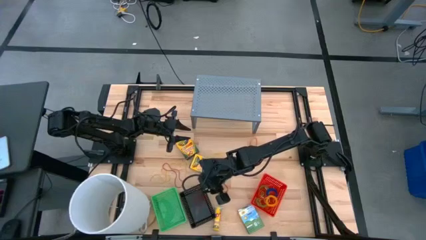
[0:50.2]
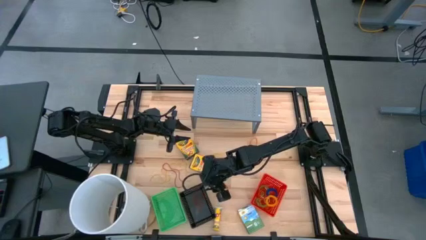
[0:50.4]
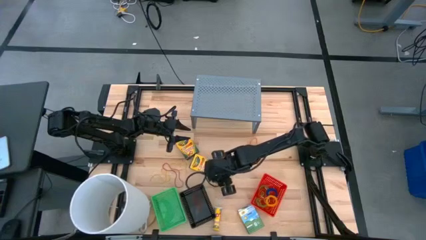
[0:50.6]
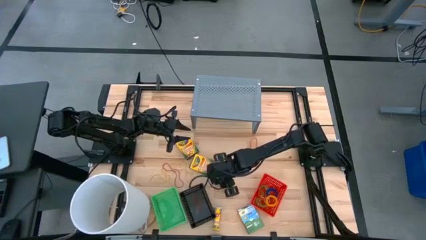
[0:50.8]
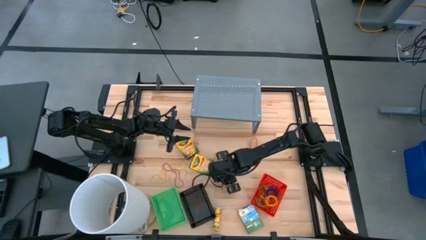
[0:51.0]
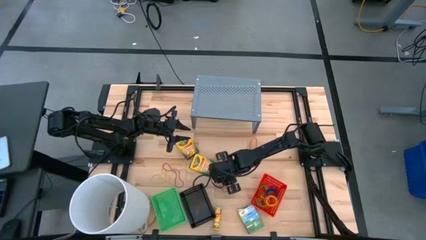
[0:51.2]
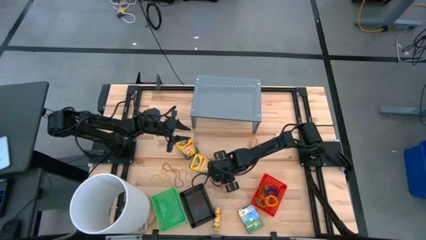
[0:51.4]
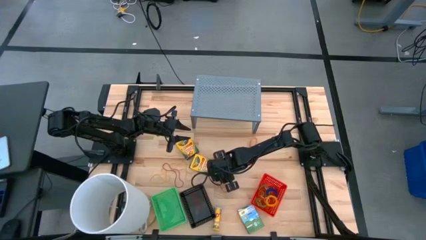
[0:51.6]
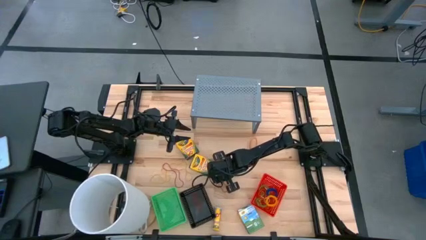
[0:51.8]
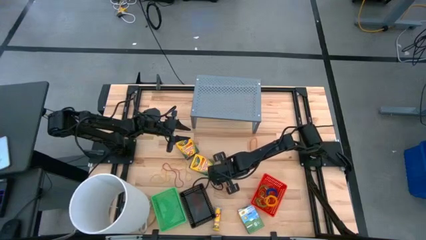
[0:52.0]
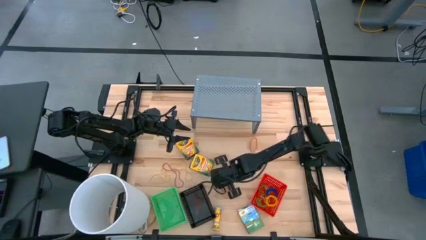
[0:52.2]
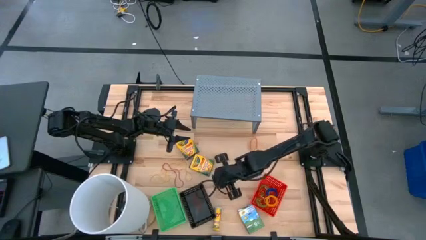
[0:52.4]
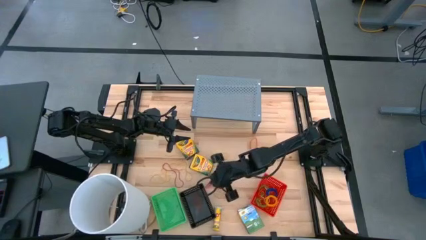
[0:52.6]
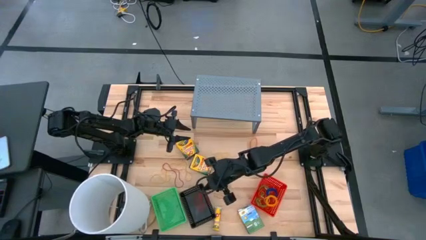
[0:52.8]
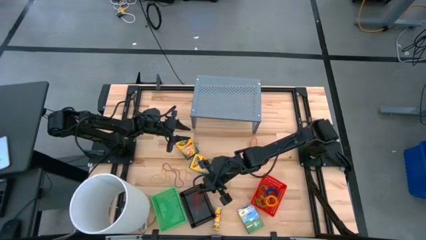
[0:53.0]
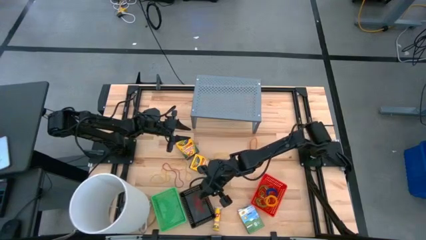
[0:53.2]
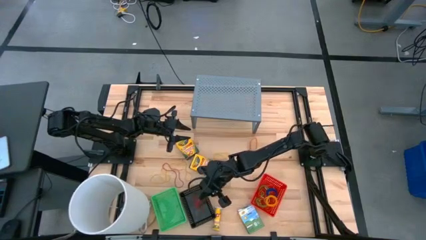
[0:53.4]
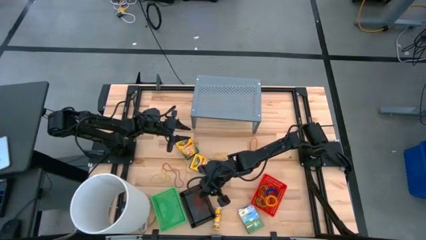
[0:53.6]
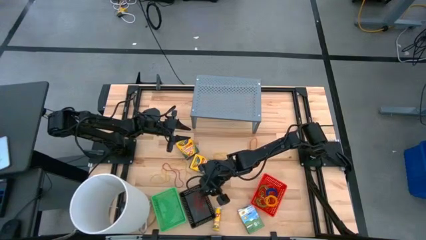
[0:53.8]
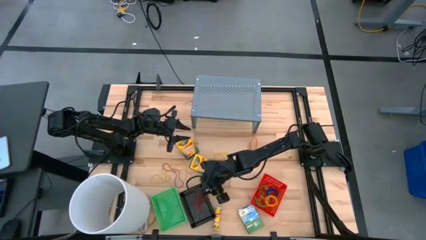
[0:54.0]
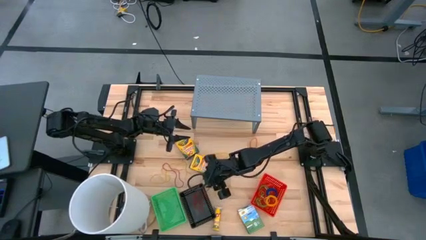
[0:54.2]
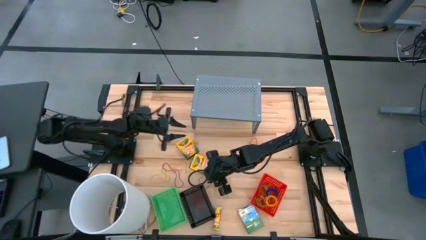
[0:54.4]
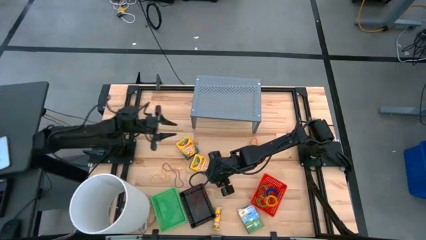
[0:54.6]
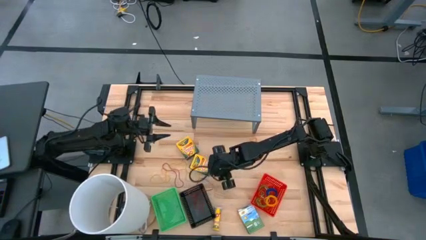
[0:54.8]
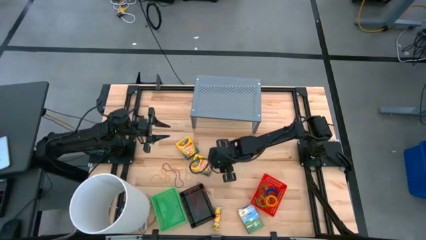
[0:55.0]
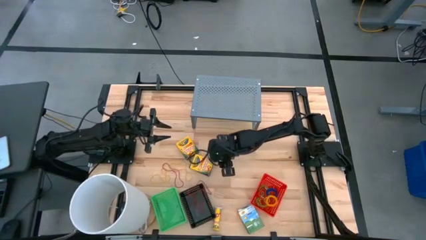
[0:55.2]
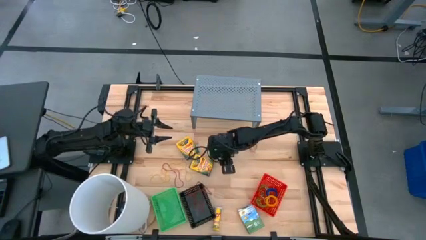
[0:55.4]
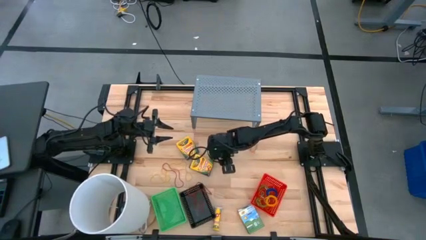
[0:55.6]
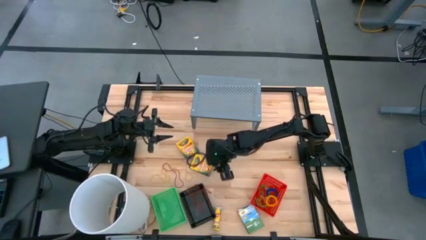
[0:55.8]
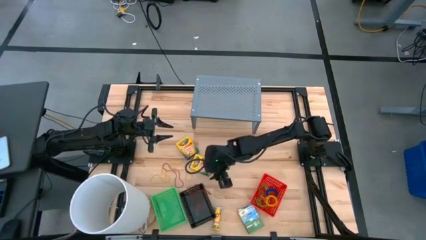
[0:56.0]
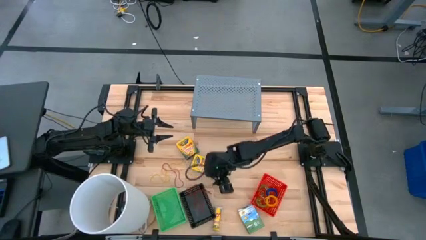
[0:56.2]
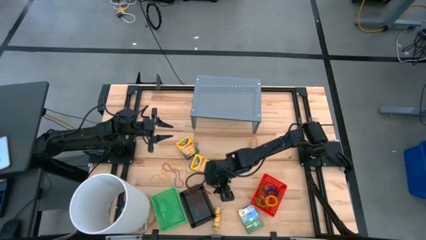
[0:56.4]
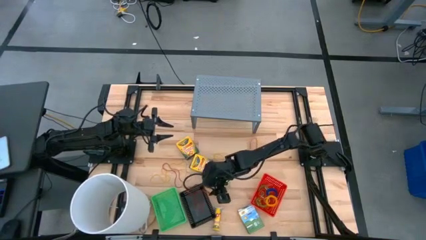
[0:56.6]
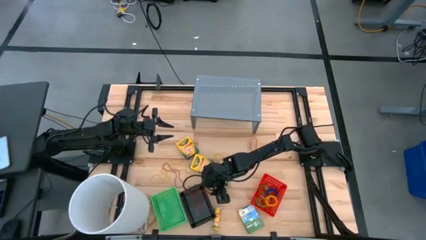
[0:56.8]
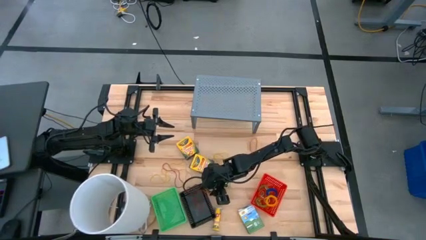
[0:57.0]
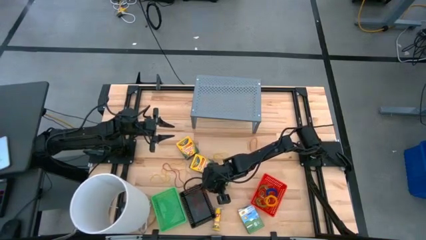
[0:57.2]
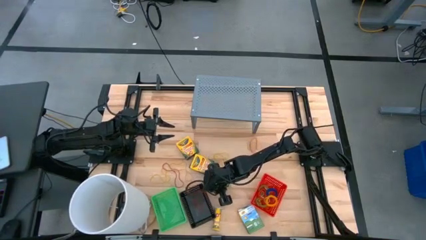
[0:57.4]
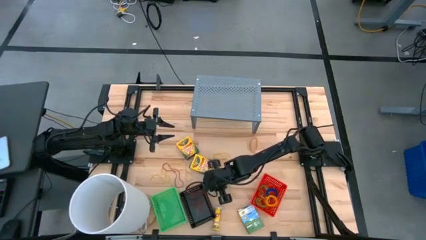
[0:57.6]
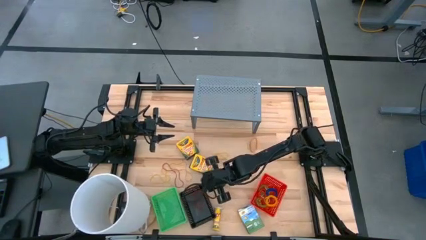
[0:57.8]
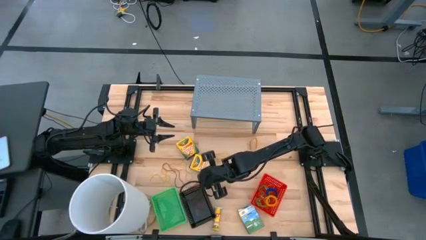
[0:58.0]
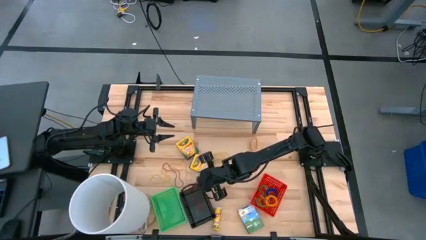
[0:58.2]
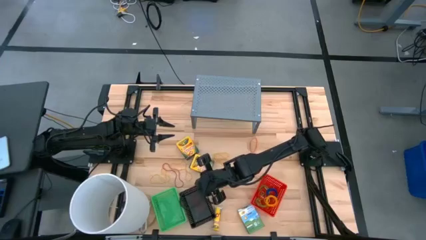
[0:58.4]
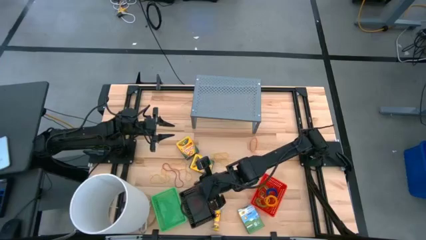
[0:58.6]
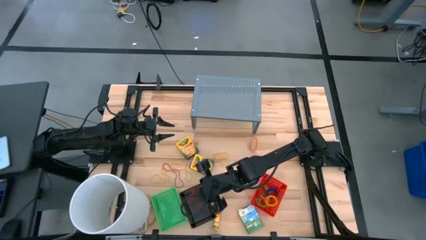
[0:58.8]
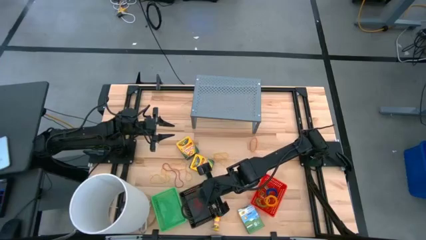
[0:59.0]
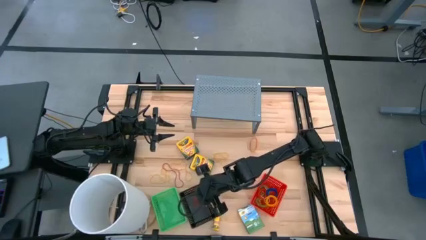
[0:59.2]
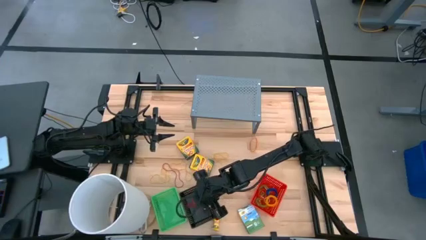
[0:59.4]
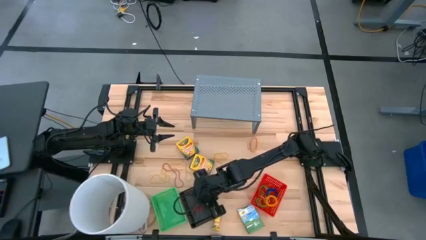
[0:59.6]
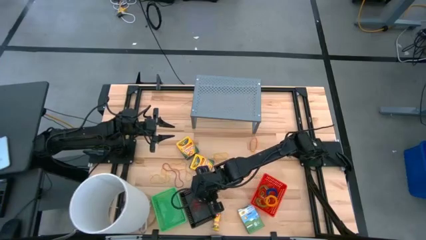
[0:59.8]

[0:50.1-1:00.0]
Task: Pick & Place Office Desk Supplies
Put the red rubber band into the black bin

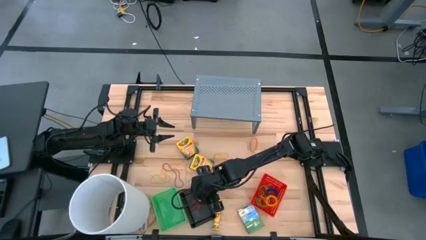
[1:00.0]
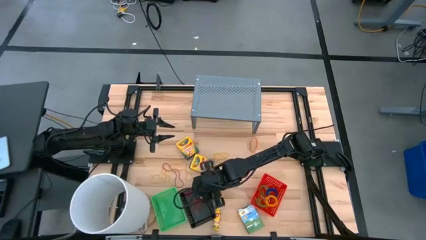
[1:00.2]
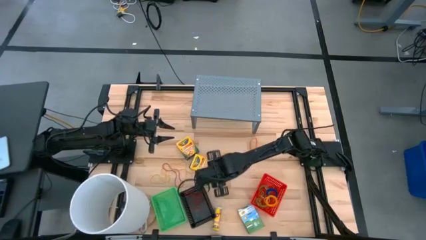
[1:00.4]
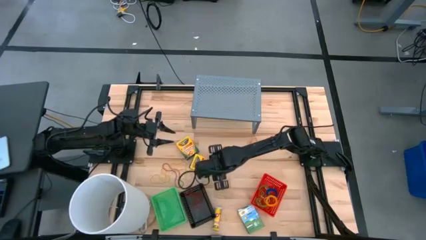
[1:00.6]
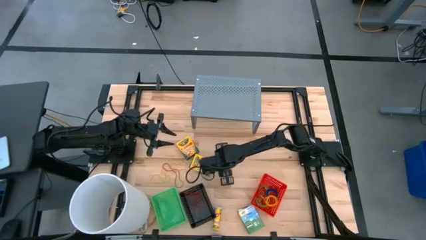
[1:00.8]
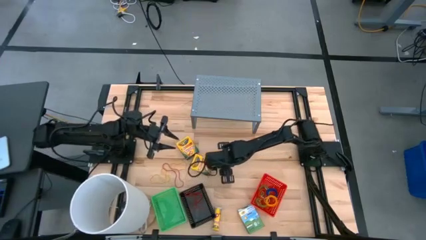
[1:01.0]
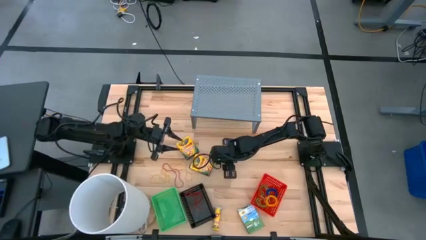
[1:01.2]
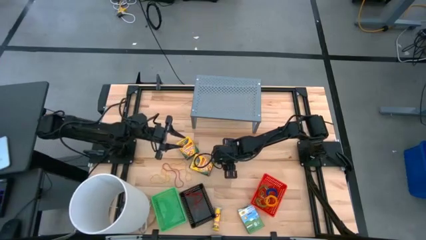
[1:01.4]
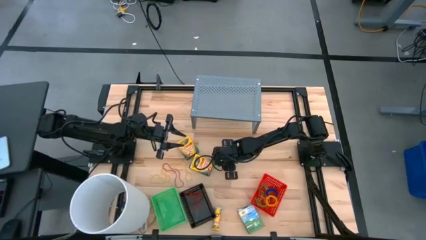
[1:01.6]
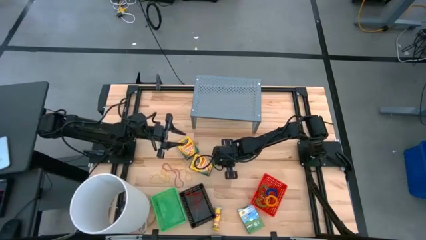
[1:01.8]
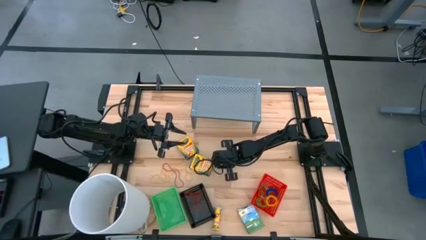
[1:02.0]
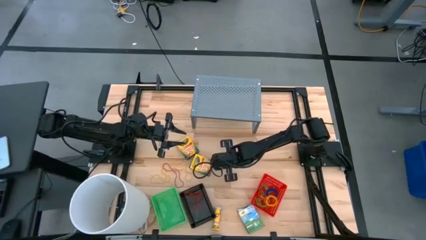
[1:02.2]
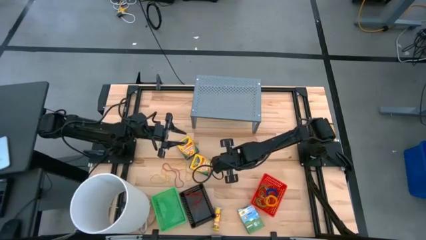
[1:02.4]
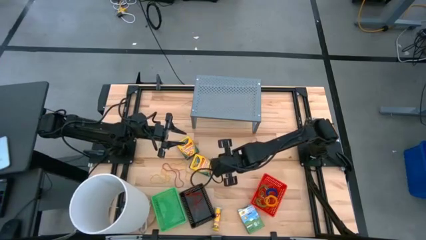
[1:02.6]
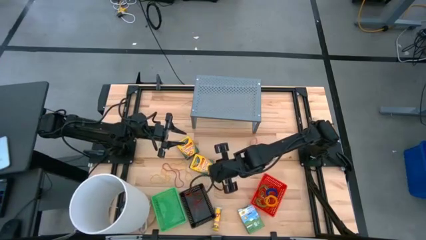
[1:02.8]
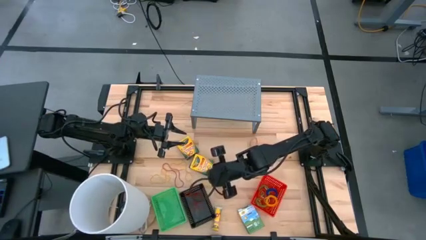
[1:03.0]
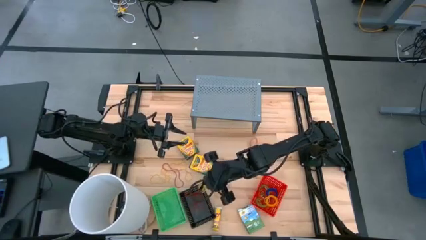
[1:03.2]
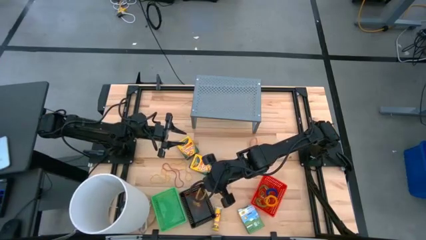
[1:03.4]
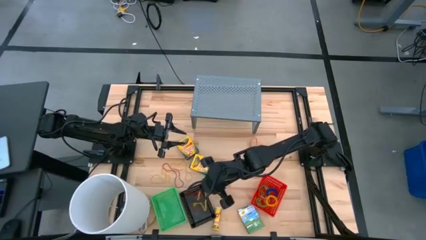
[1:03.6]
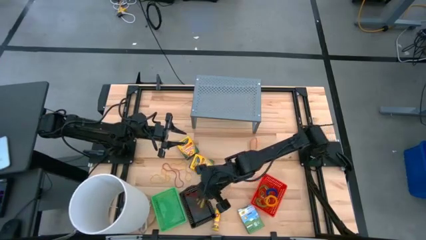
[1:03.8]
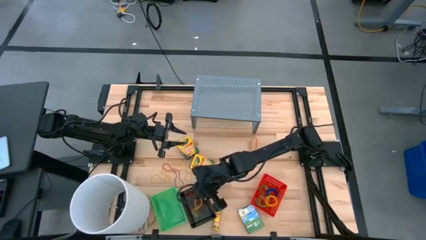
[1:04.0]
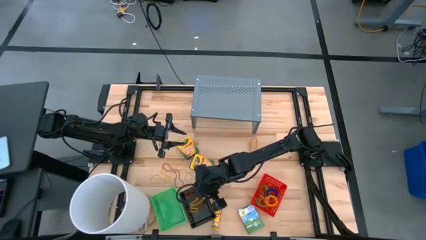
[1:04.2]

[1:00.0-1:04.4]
Put the yellow rubber band into the black bin

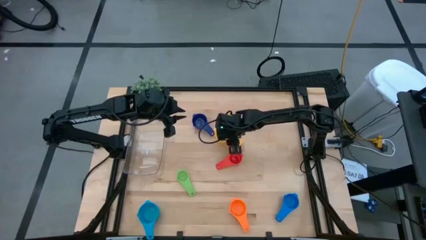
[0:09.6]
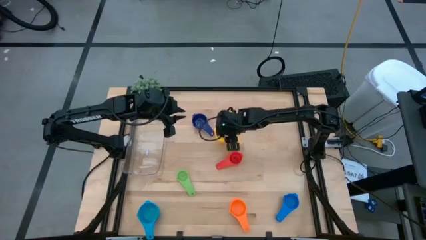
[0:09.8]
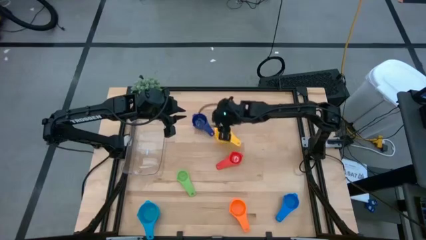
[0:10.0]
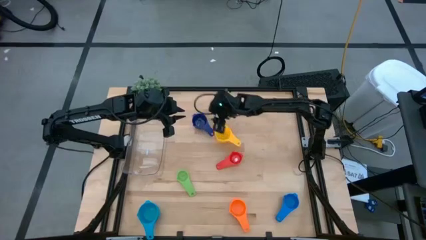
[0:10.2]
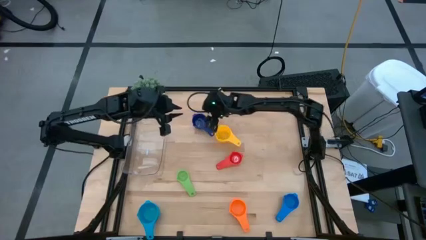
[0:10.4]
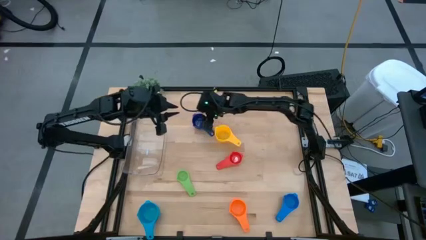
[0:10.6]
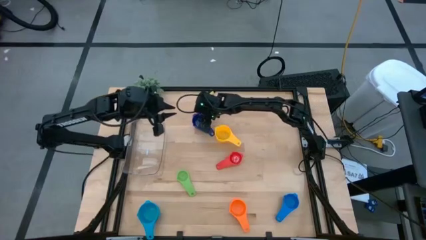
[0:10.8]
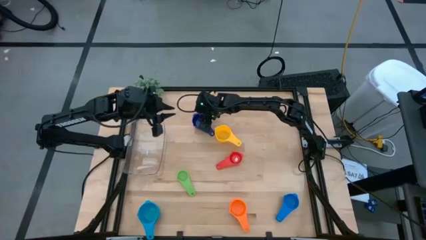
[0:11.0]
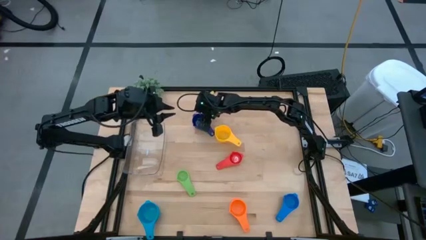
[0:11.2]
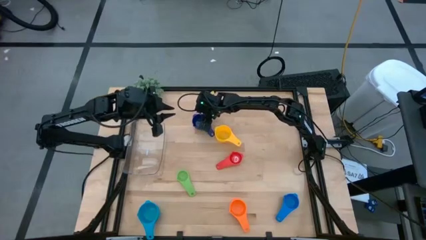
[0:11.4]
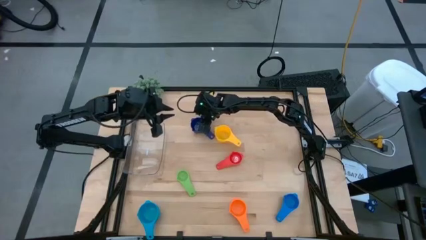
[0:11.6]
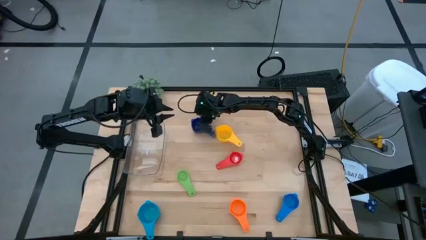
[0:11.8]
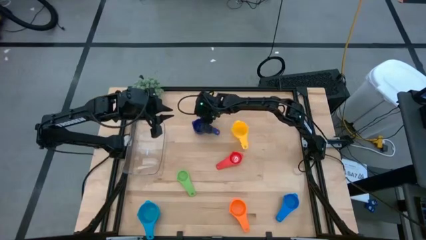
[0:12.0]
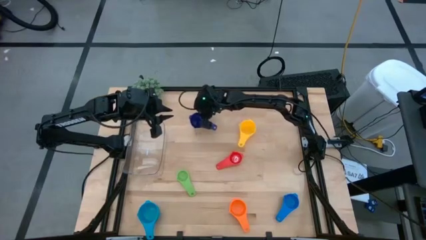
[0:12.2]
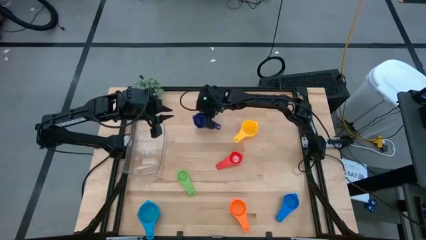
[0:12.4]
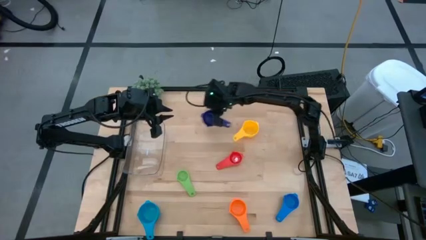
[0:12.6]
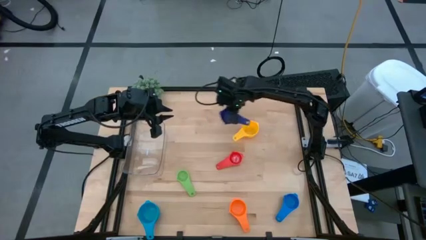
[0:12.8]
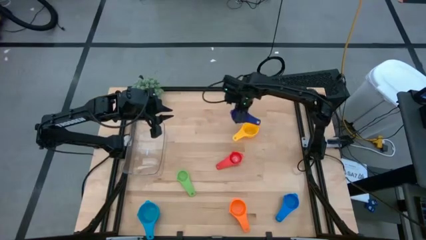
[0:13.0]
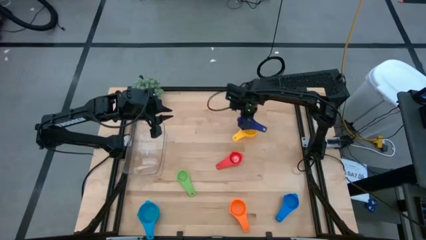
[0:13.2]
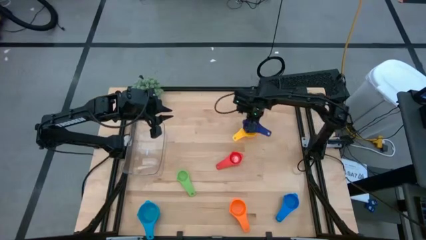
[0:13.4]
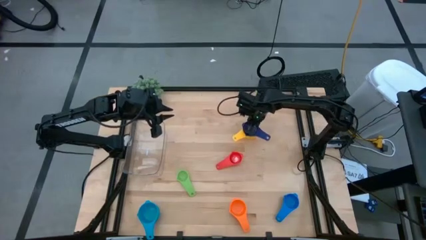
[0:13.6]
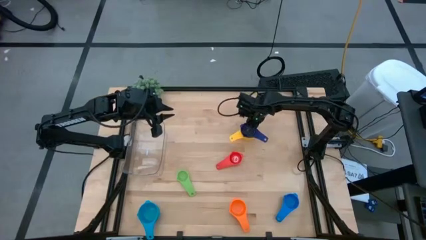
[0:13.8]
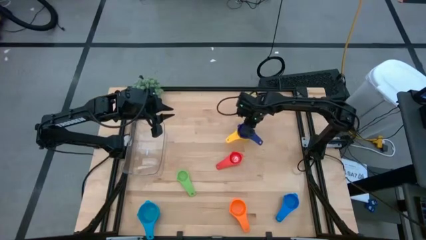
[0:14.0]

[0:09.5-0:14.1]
Task: Nest measuring cups in basket
Stack the dark blue measuring cup on top of the yellow measuring cup
